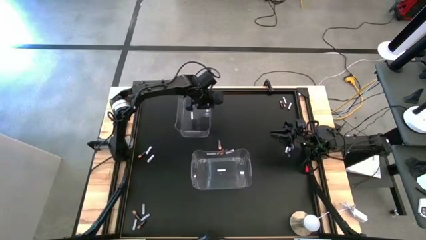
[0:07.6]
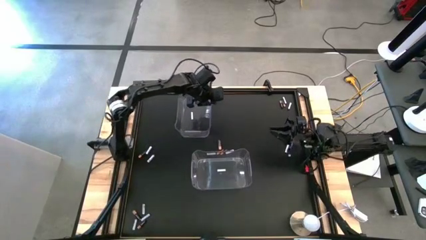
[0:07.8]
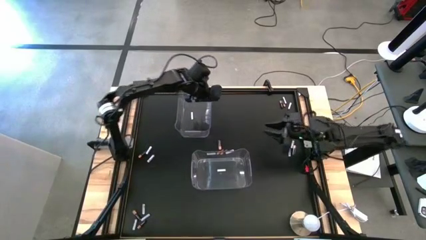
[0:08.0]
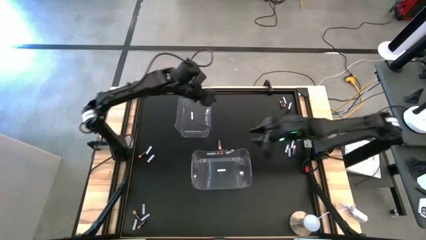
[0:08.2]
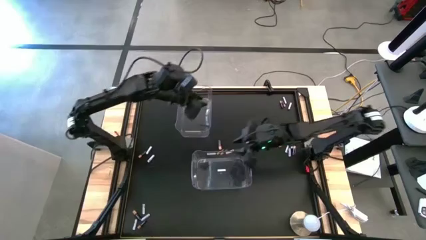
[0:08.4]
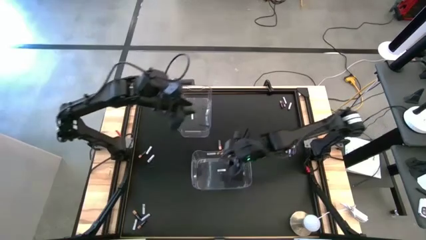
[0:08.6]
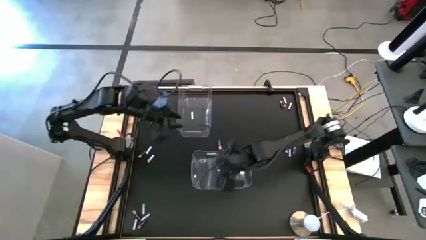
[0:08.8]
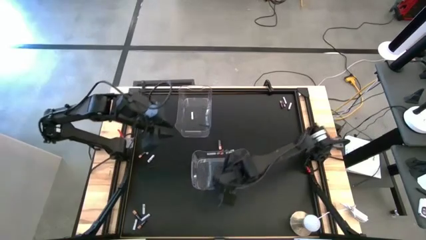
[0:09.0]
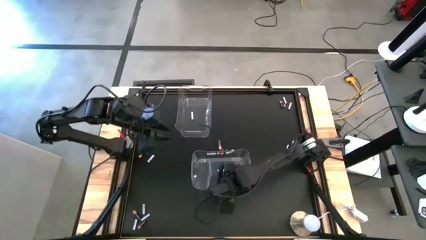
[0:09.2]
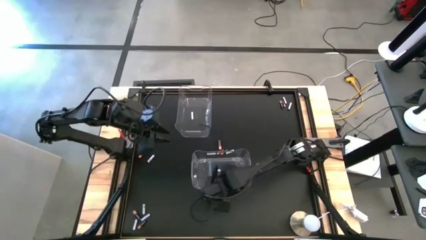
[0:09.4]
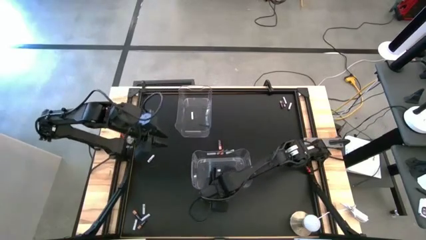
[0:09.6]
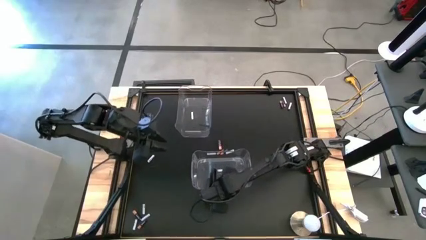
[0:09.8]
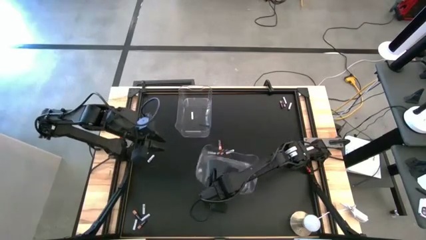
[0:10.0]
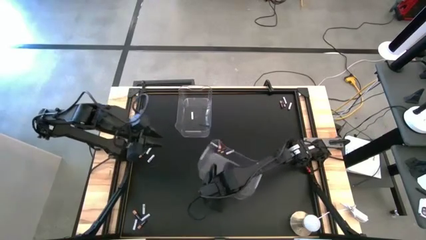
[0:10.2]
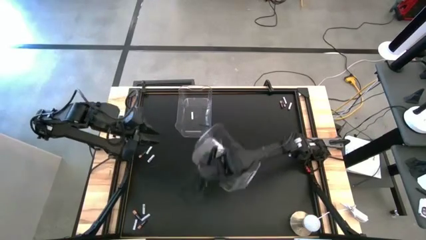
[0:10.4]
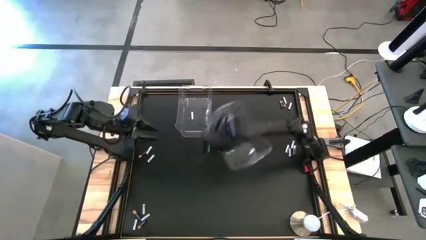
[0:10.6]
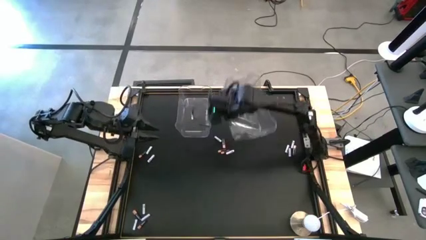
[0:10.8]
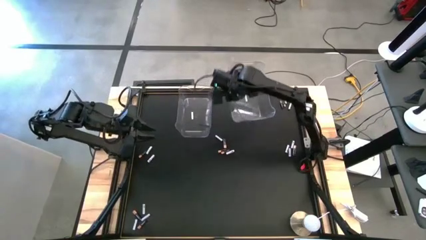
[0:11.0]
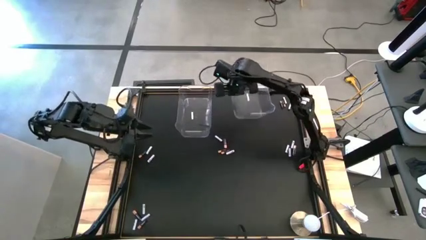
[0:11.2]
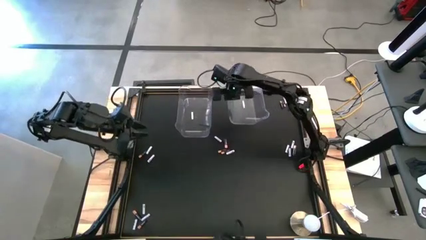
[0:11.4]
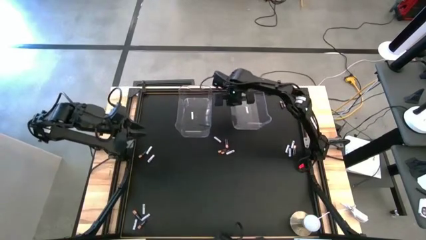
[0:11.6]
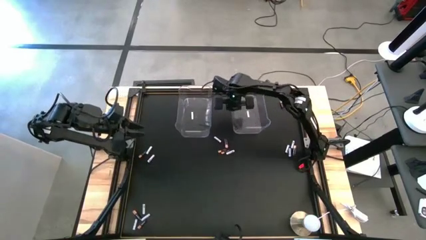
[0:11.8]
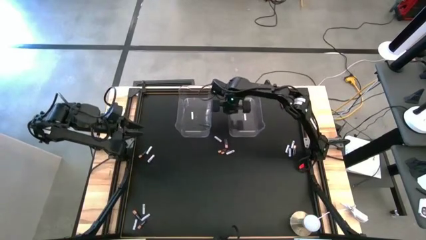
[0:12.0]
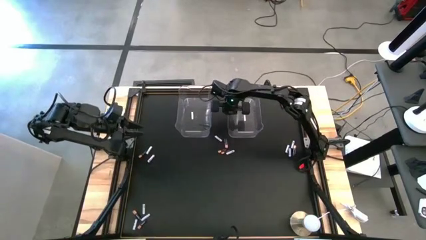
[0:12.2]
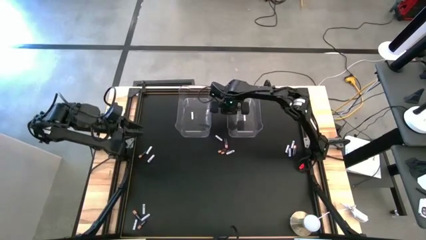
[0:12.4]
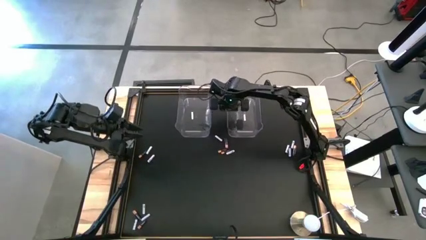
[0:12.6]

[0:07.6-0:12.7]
Task: Sort batteries
Move the bottom transparent bin to the top right of the table

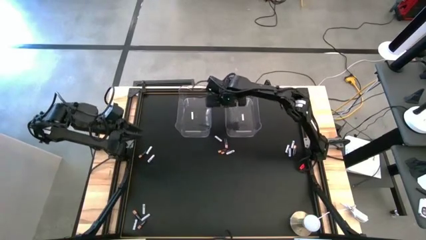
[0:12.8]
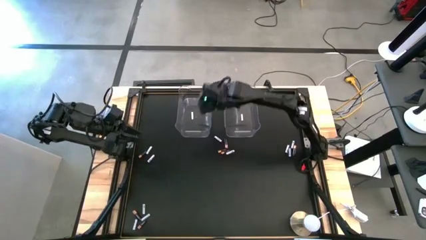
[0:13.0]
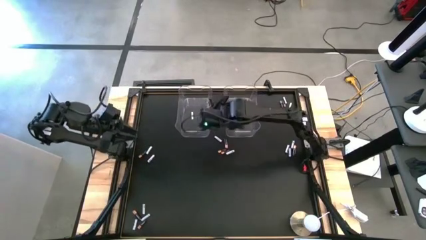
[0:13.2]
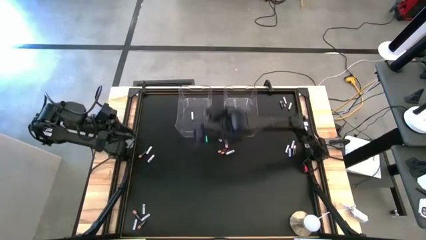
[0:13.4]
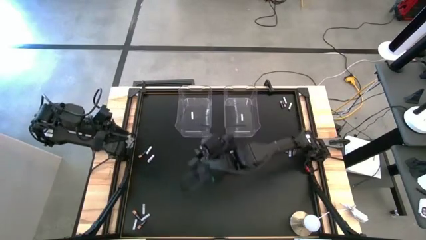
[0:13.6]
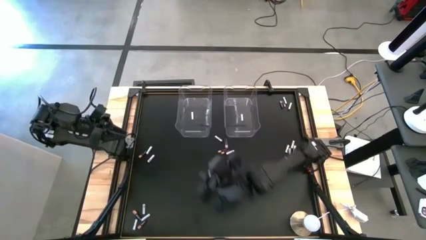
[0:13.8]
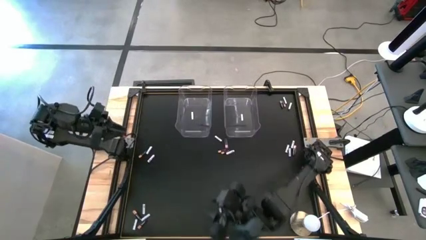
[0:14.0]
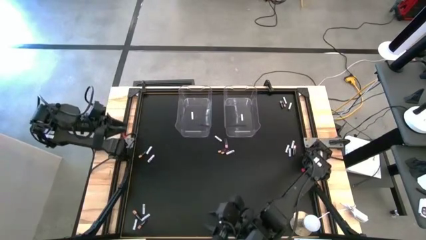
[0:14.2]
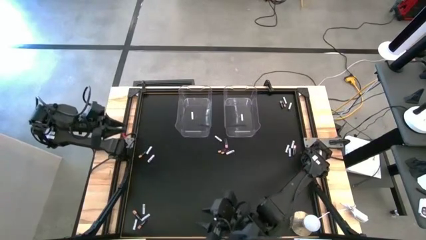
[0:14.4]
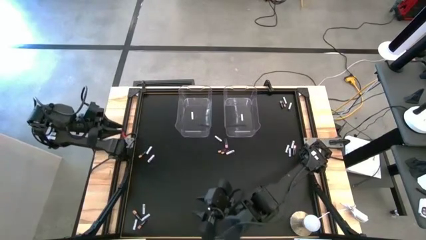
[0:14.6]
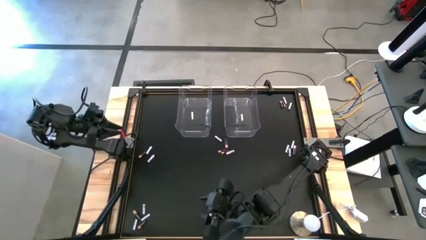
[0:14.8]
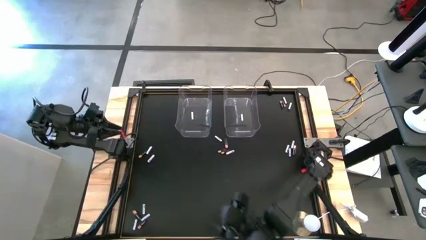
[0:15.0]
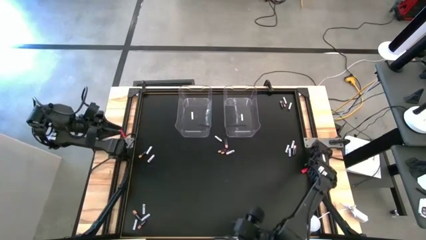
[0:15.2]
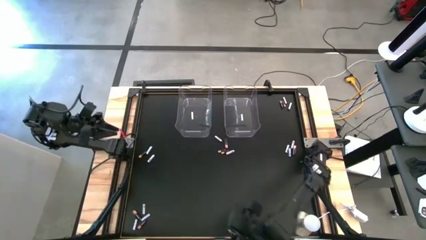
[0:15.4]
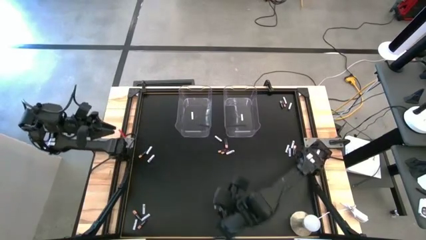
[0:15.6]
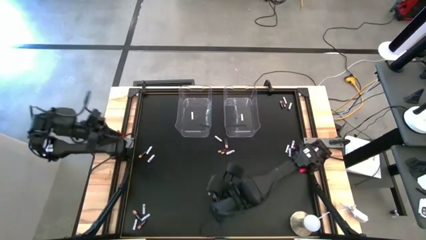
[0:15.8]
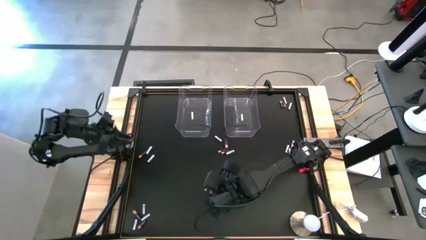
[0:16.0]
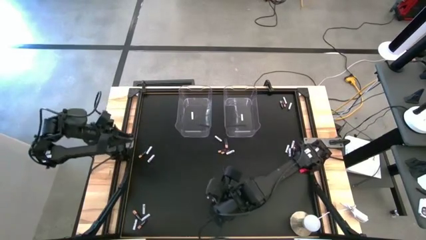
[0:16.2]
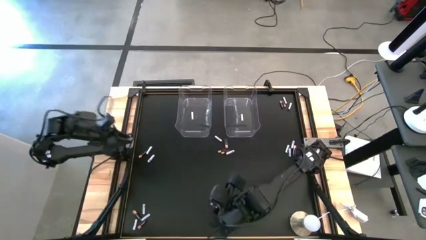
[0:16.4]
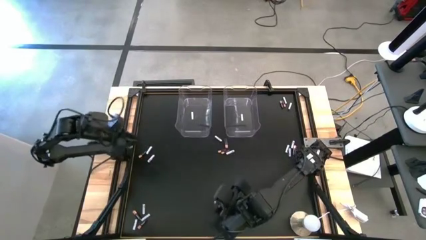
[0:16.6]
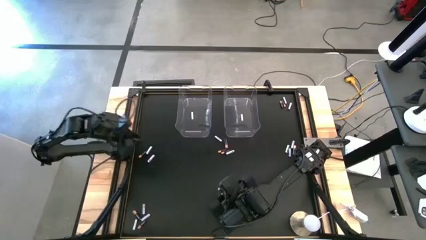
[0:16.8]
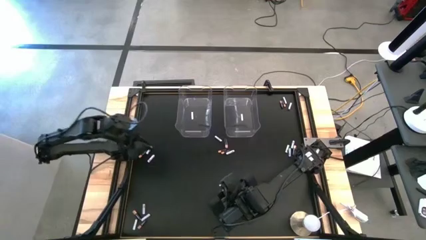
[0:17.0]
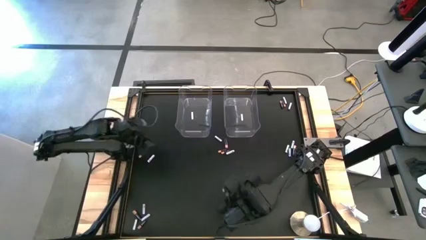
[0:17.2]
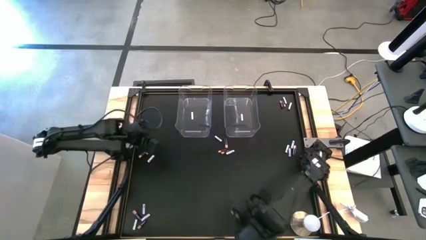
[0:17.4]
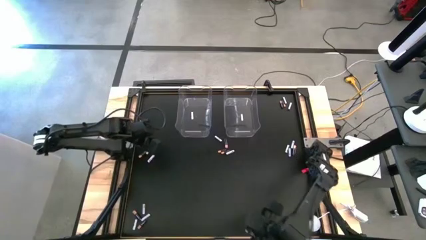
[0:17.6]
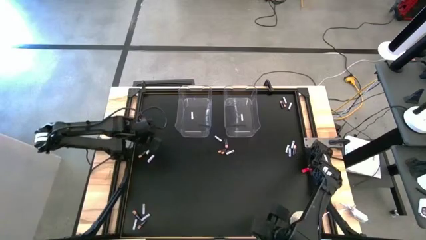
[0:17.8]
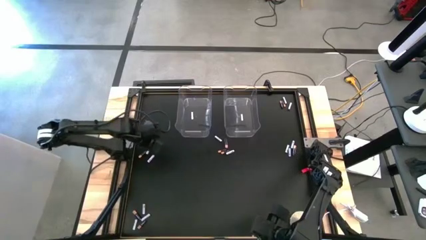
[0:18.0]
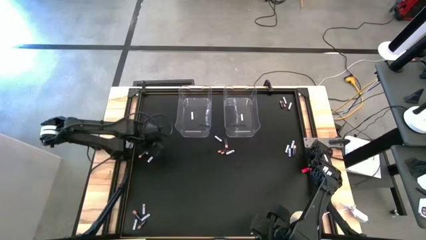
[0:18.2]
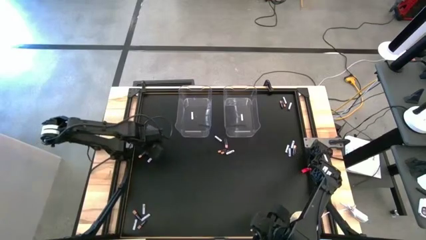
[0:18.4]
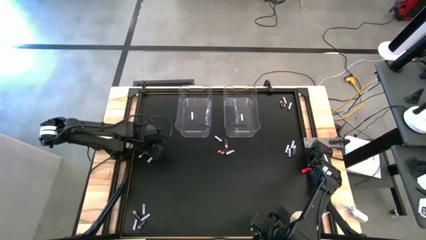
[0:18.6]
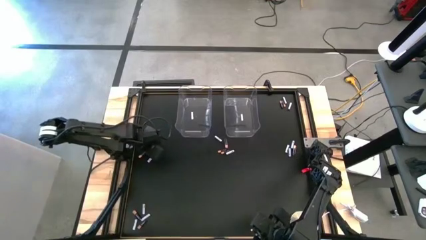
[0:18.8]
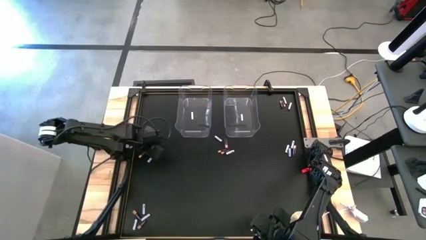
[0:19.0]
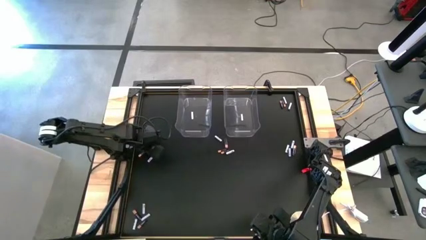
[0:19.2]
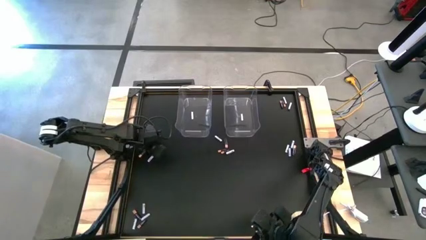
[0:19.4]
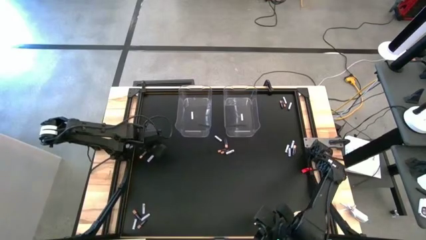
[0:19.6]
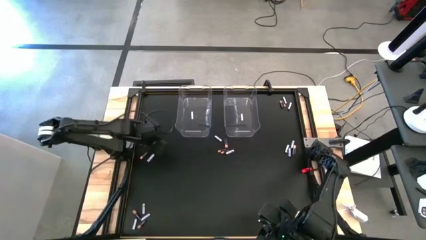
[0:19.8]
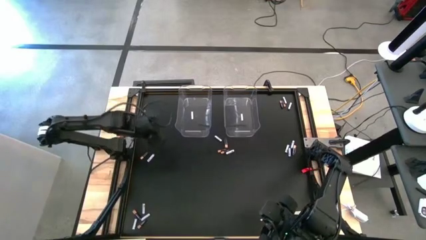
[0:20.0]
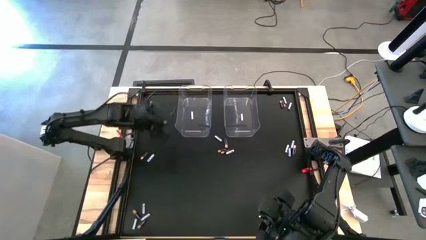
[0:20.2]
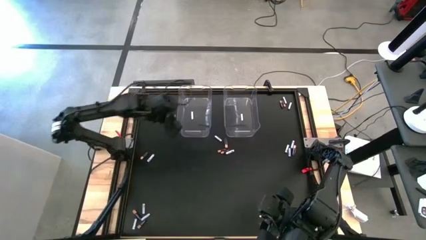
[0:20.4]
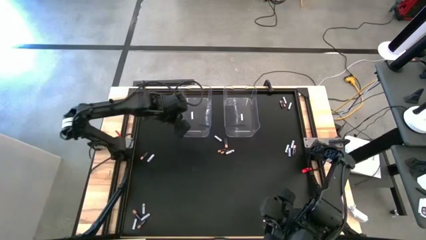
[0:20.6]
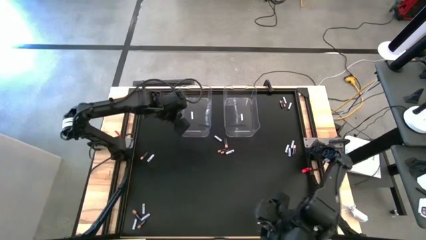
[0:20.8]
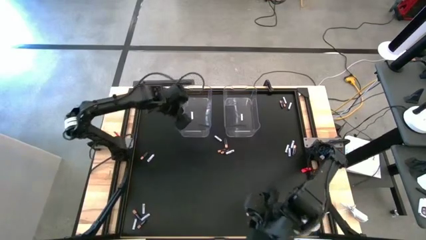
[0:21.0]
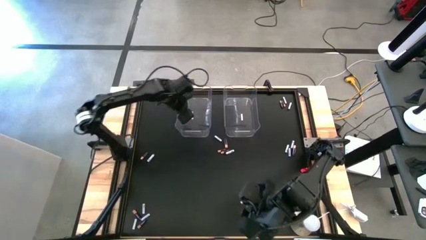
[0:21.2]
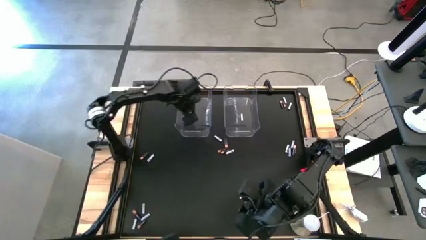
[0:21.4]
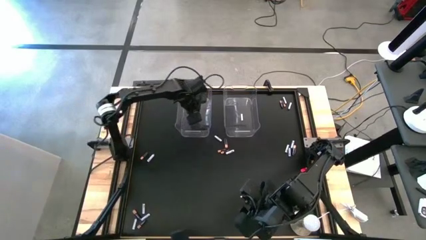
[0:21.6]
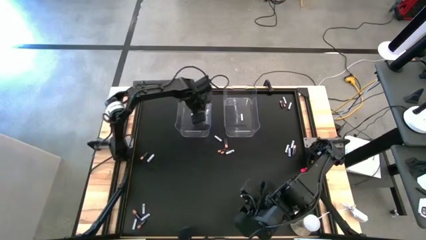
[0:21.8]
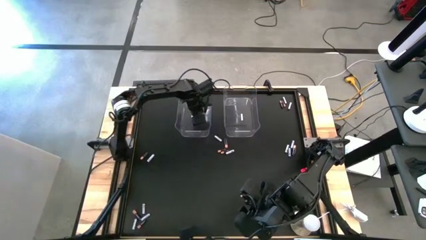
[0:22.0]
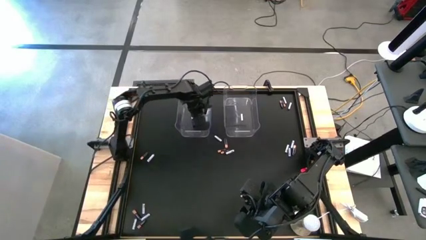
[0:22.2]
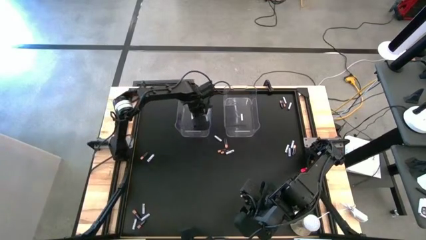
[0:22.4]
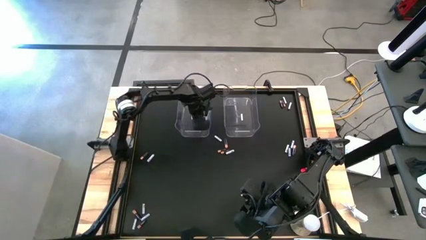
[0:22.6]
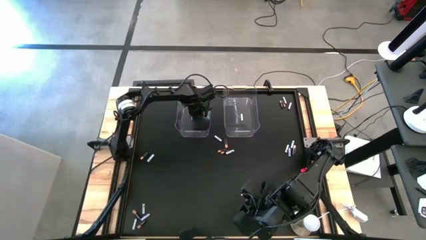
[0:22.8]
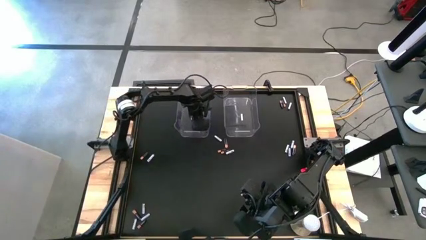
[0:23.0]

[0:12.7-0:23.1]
Put the white battery into the left transparent bin
